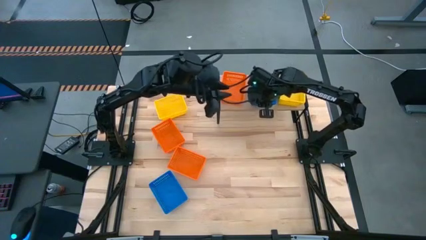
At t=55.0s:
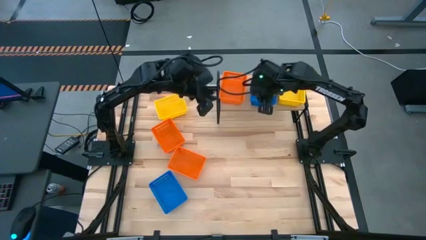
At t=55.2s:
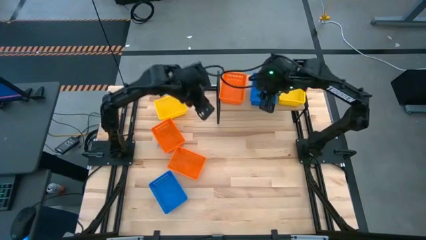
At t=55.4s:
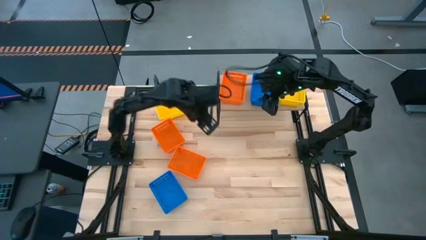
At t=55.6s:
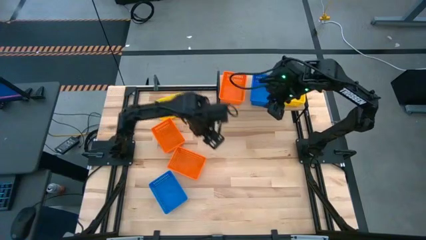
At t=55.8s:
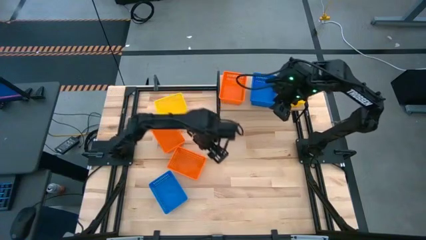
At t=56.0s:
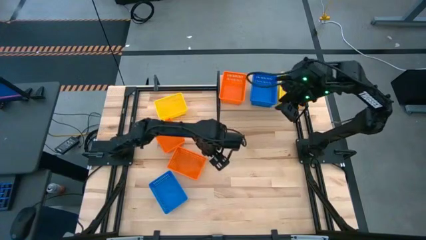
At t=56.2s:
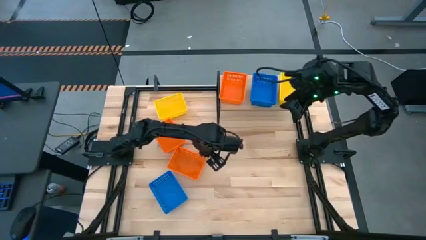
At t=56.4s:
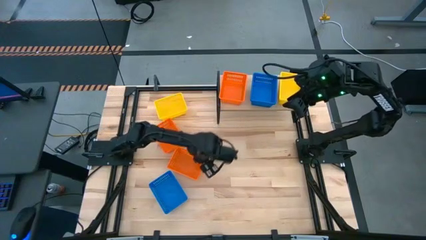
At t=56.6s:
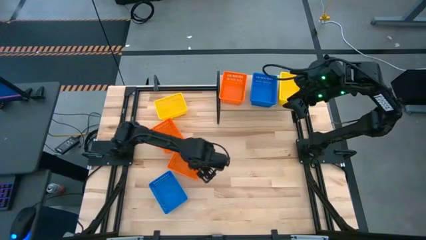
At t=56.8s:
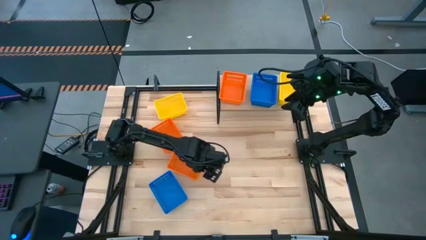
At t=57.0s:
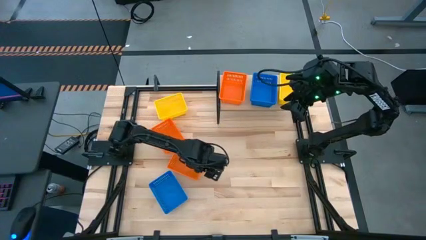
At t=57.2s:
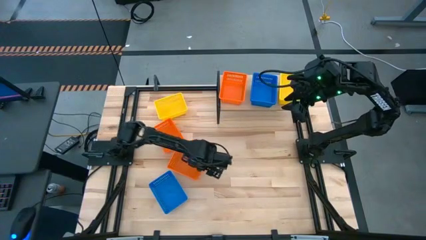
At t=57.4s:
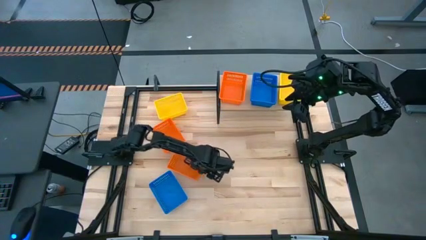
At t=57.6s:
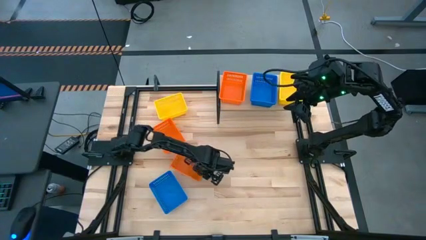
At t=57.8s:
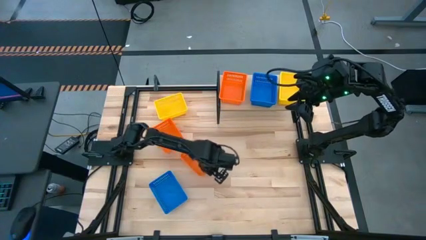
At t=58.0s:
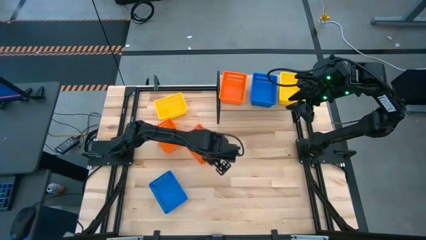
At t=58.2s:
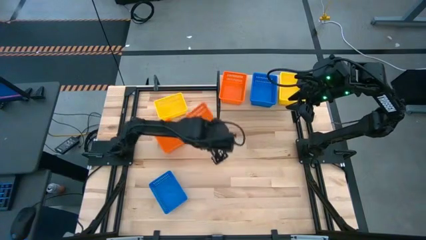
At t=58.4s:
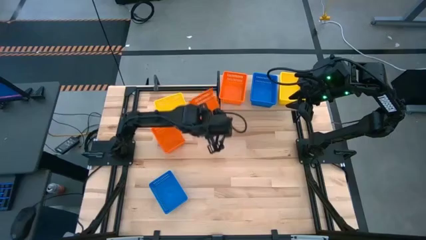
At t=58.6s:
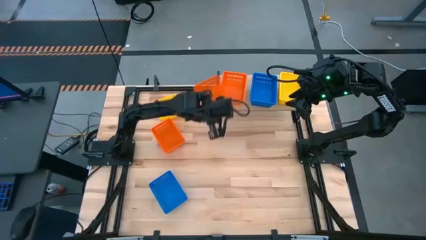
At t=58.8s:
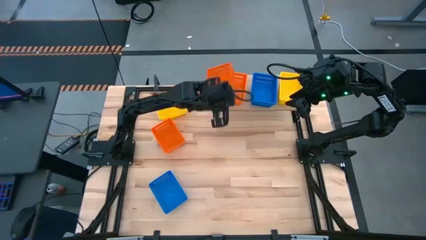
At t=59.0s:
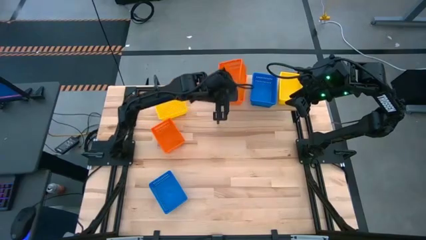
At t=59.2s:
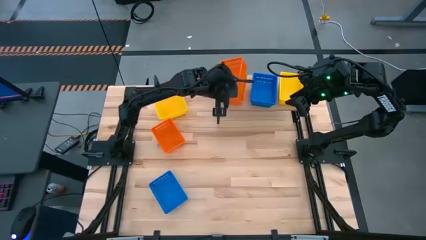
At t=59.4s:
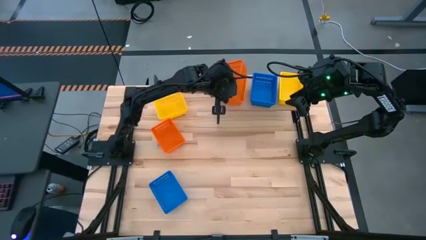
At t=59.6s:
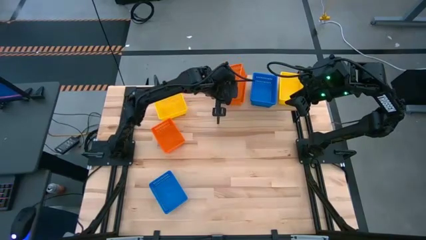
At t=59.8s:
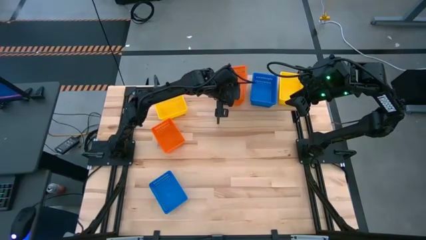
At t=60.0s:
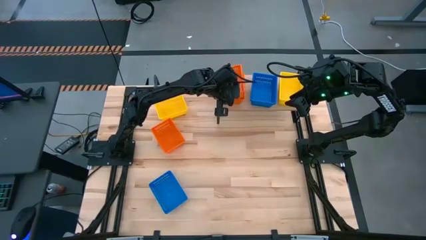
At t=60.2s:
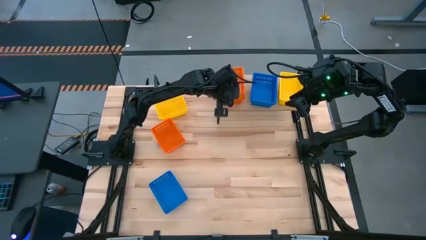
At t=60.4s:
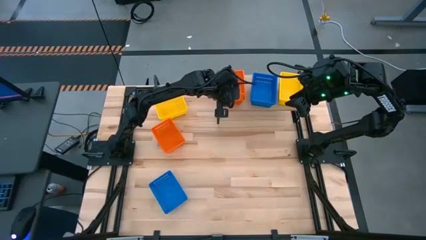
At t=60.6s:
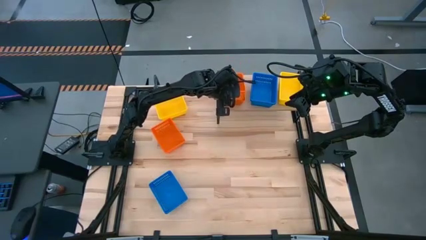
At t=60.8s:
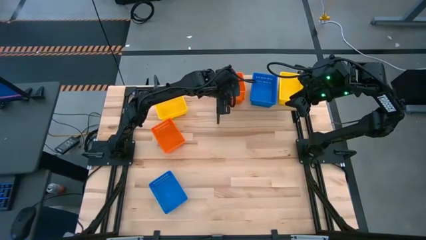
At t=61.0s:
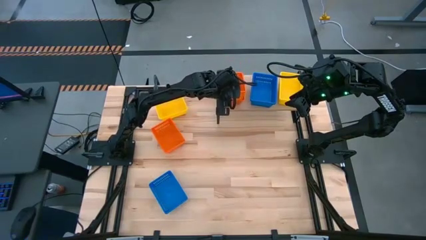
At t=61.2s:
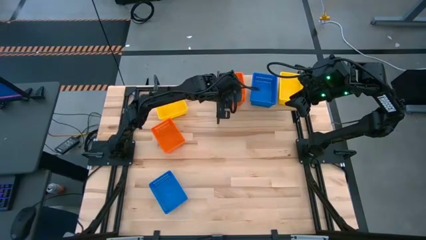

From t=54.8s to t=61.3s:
Task: Stack baskets on shelf by color
Stack the bottom orange basket on top of the orange basket on the shelf
